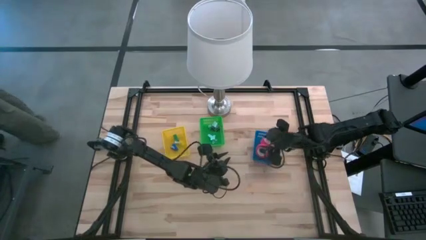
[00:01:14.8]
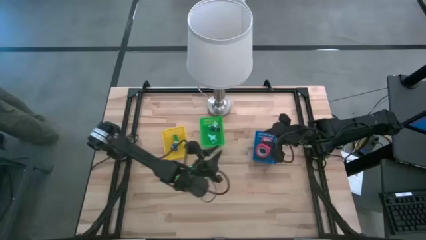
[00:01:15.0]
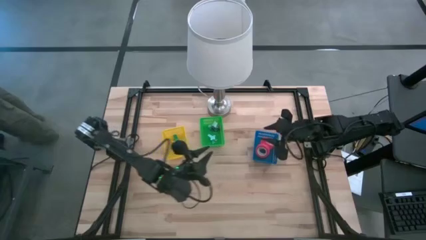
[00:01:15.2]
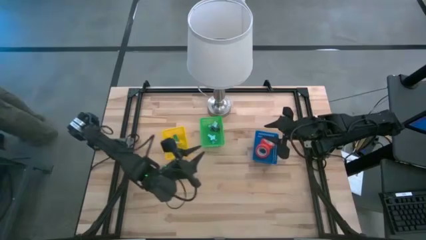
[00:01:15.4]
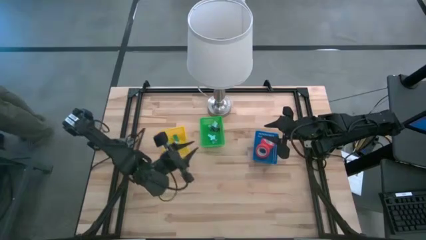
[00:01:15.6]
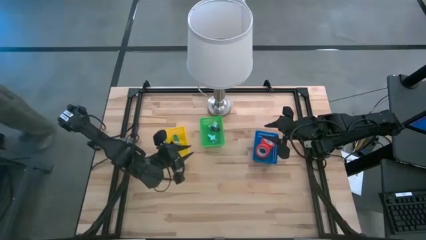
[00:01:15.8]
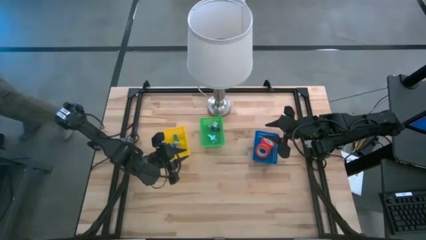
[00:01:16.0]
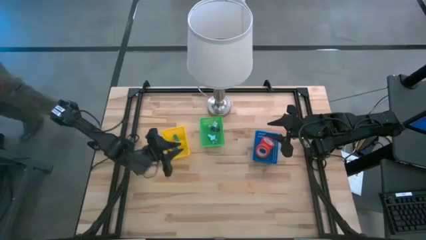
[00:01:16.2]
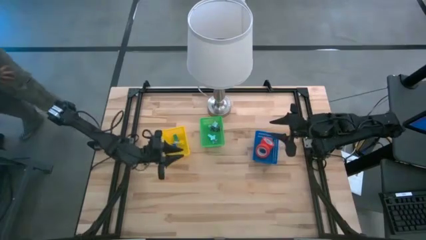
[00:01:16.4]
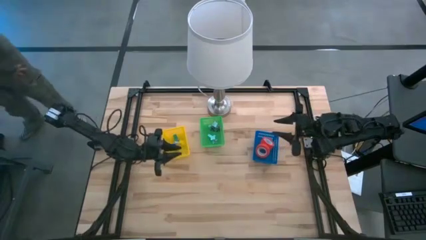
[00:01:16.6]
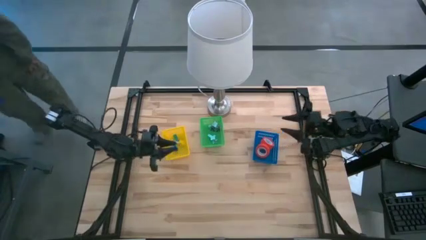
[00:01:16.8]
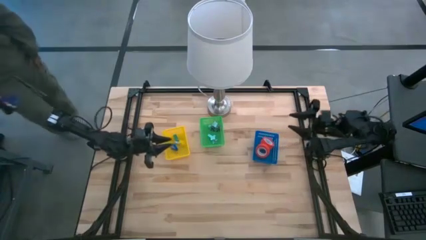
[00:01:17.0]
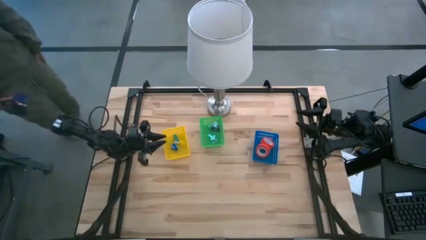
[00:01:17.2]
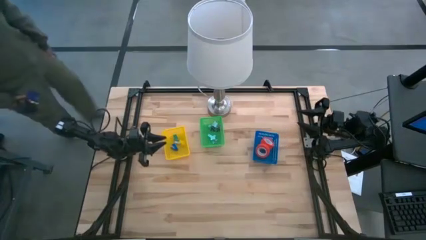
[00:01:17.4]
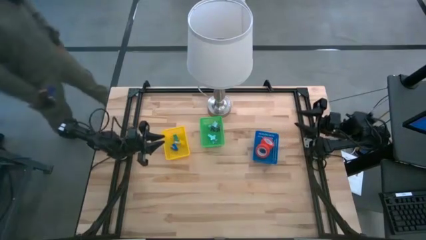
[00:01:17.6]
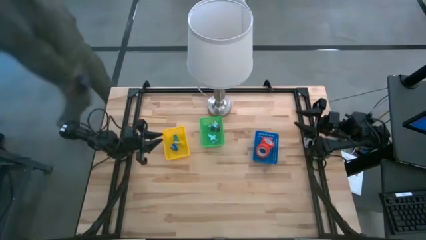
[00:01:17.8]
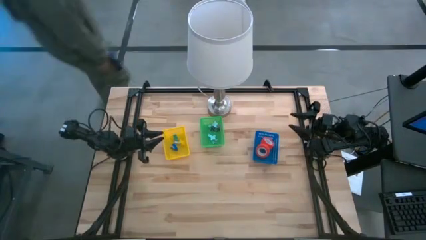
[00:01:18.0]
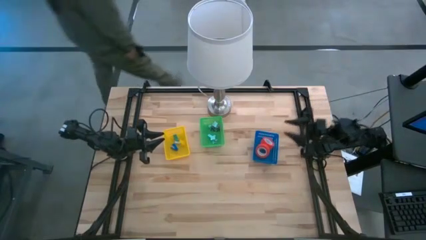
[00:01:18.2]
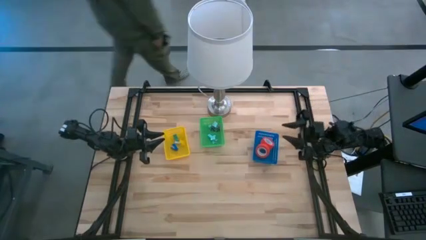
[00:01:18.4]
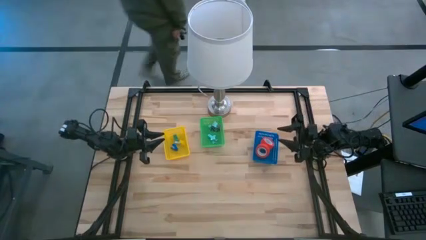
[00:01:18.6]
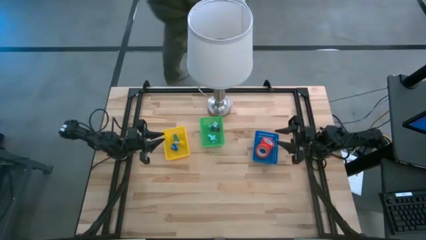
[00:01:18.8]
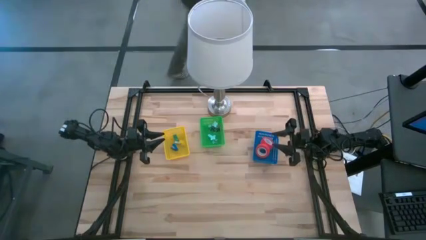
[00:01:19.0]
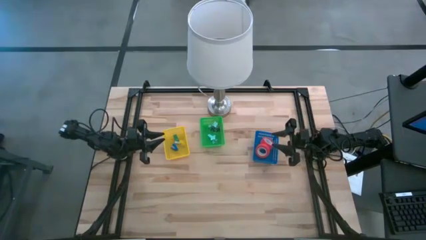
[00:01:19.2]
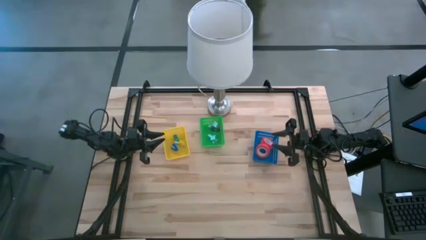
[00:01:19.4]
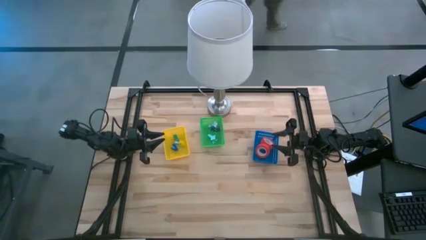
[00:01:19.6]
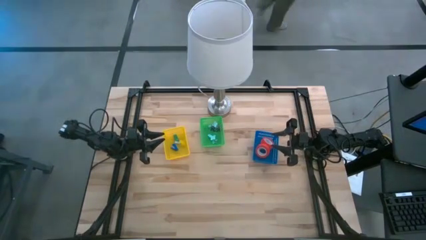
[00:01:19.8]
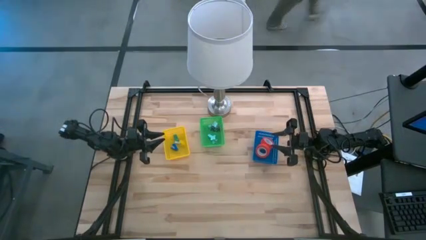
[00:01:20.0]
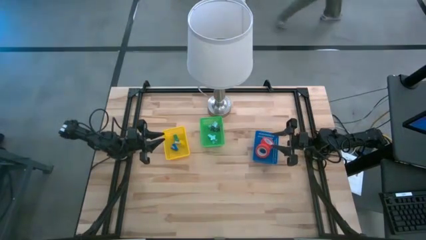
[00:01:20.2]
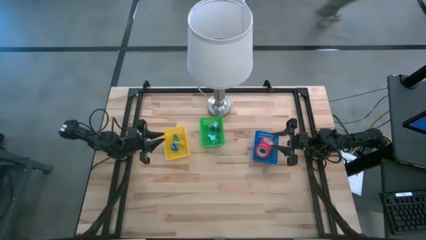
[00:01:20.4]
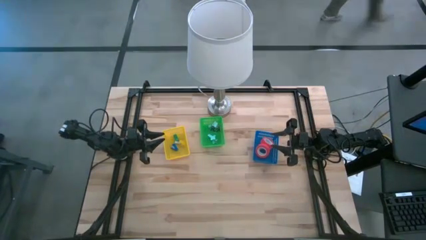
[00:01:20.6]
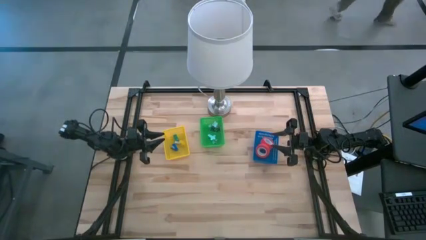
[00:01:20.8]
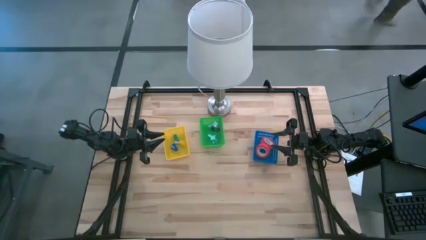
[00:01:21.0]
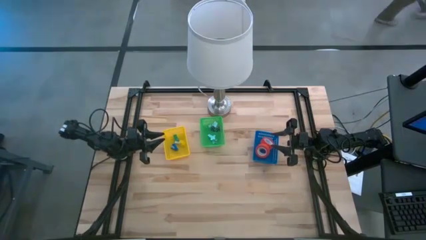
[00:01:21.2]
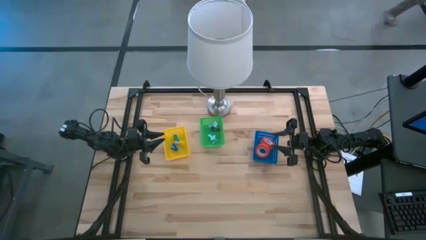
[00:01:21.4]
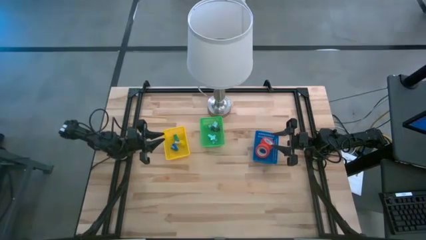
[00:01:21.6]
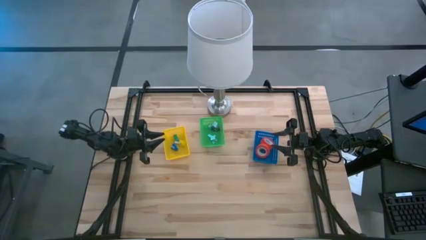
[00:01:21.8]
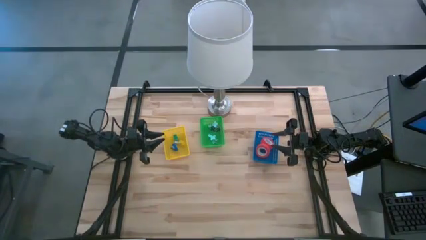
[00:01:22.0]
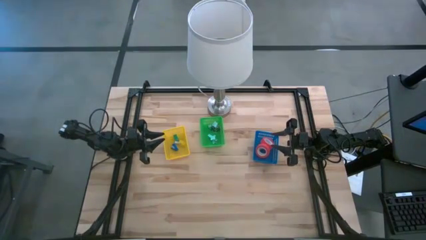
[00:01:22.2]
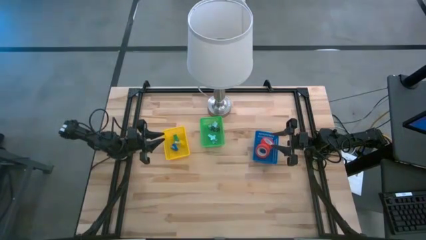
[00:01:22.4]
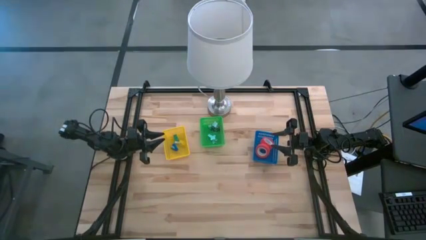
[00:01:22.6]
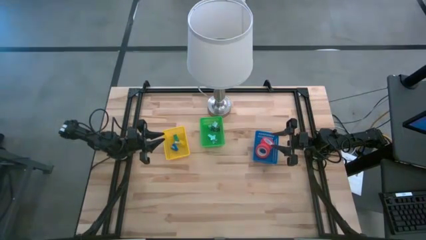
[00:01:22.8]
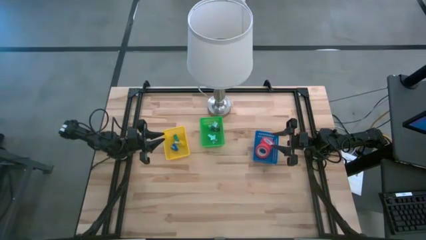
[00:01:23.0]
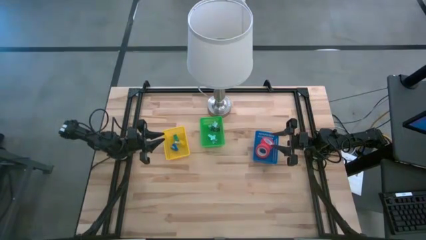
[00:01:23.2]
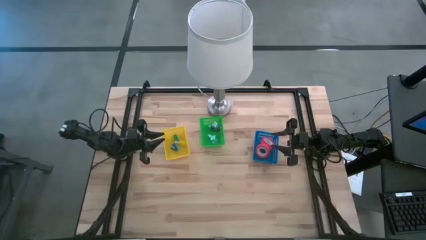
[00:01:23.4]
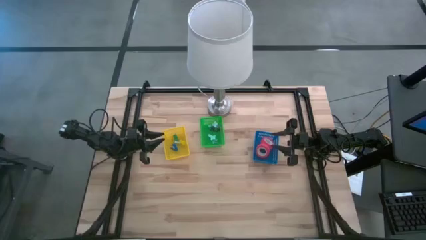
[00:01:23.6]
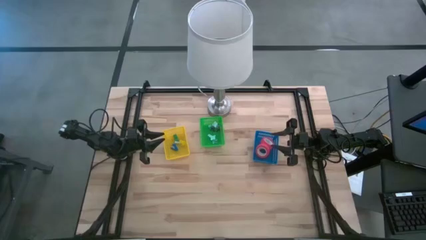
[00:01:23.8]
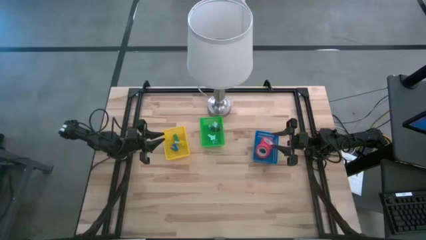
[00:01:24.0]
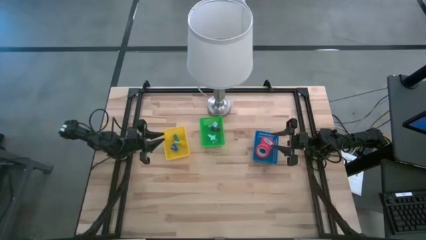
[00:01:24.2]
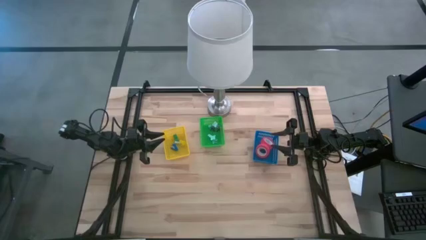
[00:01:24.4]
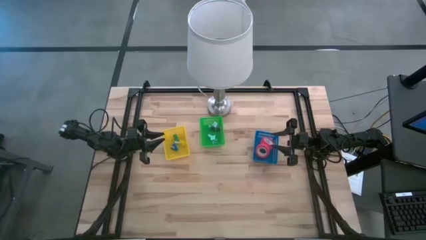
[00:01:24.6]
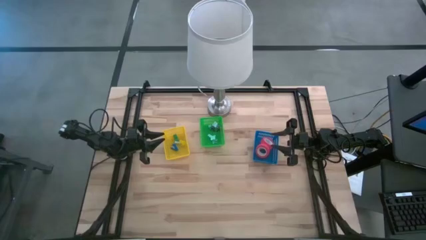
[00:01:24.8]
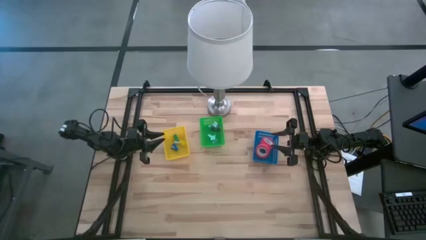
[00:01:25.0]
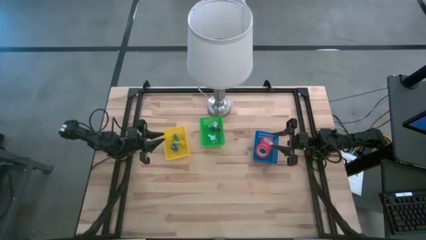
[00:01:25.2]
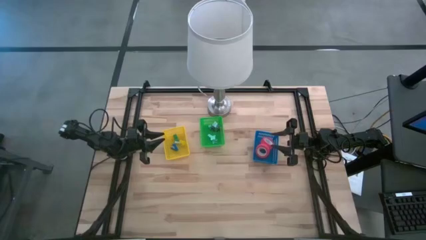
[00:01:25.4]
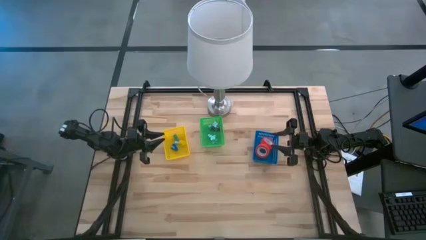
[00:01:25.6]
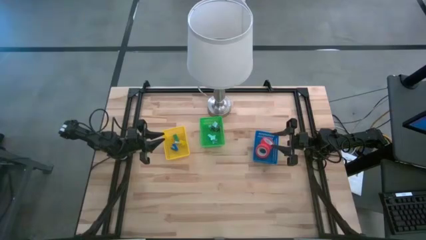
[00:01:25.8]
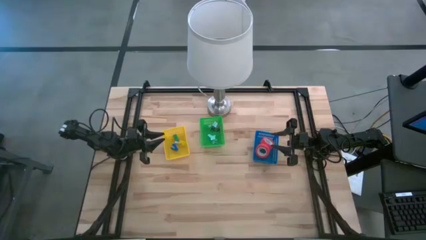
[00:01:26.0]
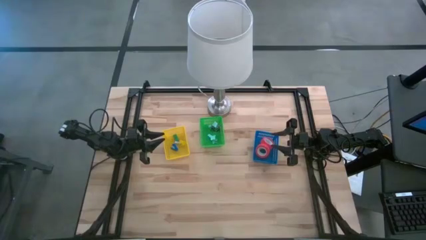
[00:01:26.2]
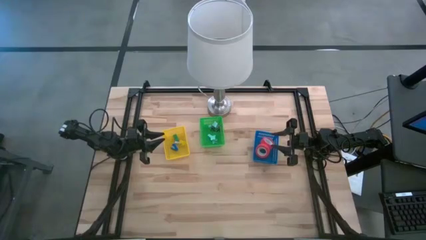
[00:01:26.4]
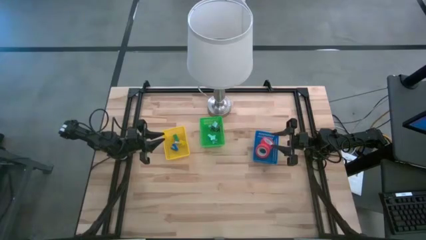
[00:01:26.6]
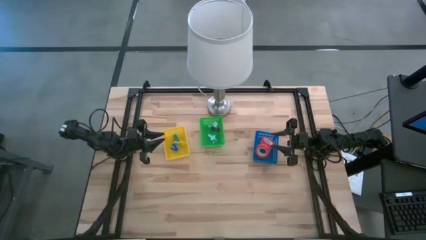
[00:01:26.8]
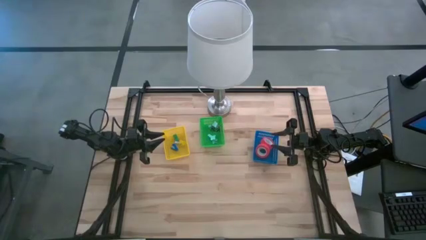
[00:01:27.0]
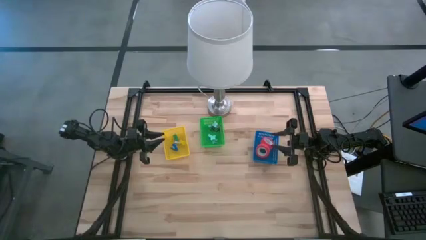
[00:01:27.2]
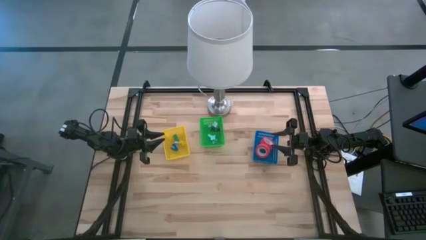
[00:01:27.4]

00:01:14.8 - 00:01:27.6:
Task: Pick and place Stapler, Stapler remover, tape
Return to Home Position

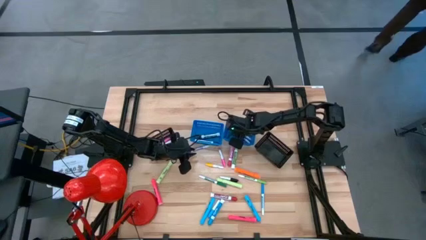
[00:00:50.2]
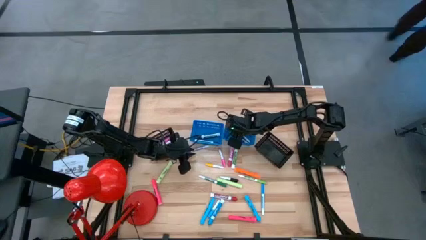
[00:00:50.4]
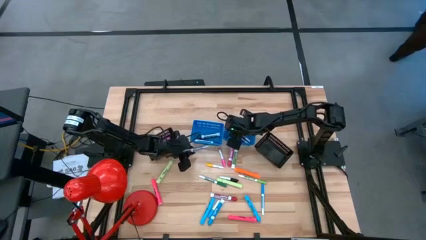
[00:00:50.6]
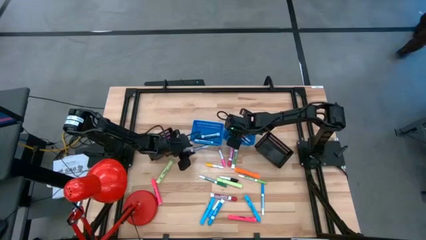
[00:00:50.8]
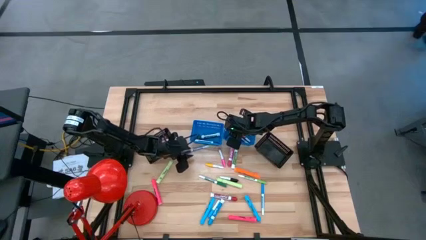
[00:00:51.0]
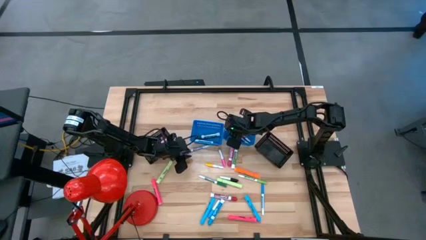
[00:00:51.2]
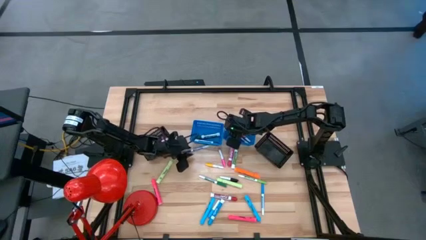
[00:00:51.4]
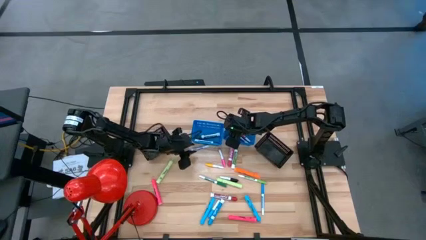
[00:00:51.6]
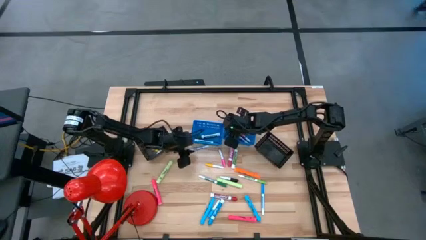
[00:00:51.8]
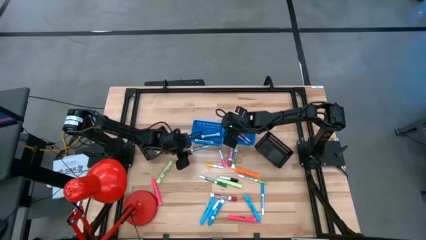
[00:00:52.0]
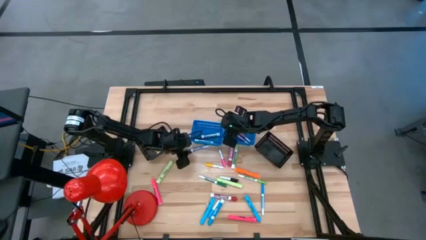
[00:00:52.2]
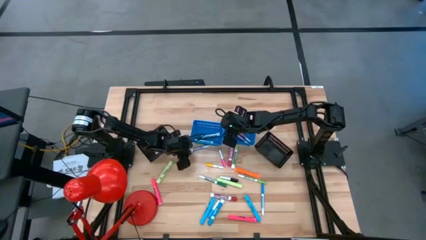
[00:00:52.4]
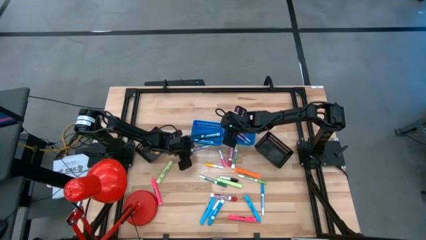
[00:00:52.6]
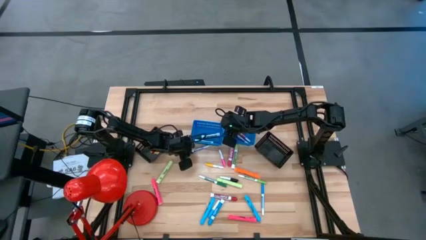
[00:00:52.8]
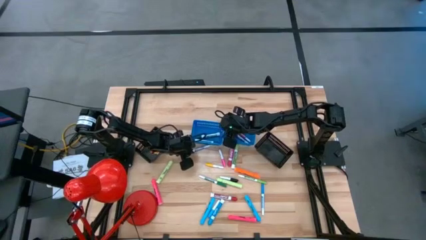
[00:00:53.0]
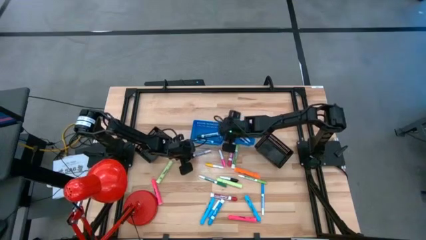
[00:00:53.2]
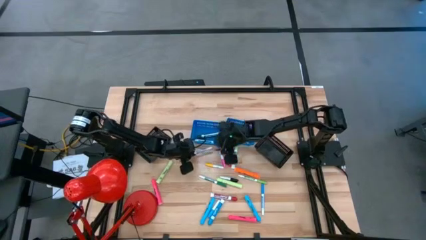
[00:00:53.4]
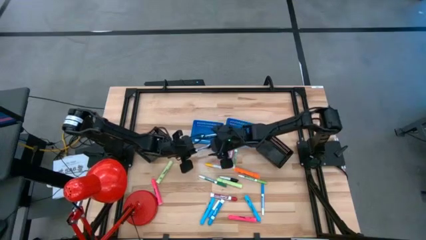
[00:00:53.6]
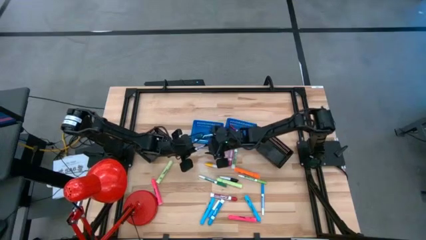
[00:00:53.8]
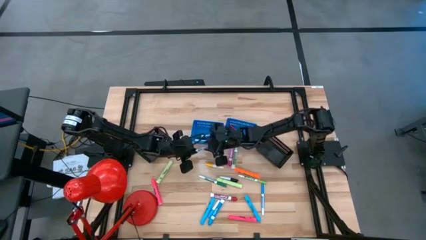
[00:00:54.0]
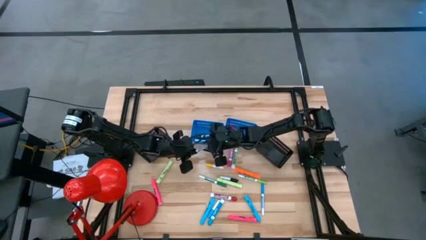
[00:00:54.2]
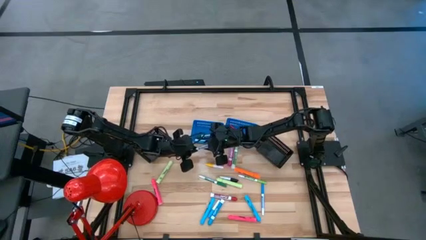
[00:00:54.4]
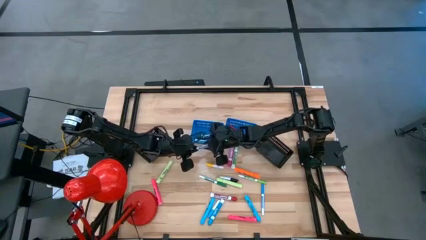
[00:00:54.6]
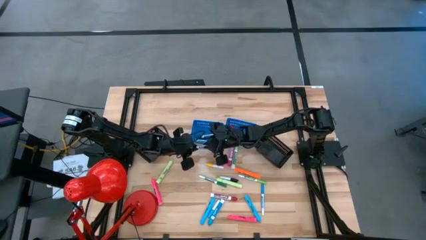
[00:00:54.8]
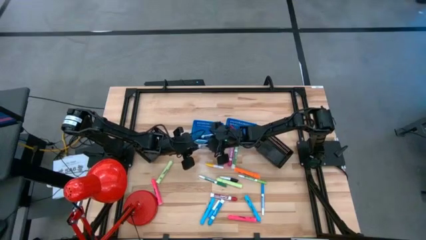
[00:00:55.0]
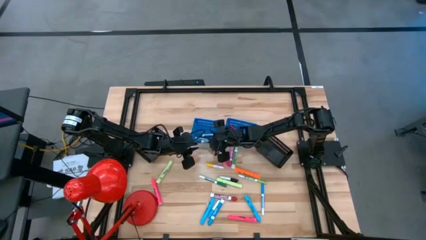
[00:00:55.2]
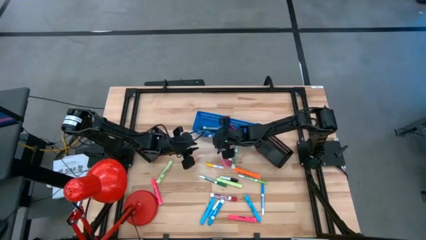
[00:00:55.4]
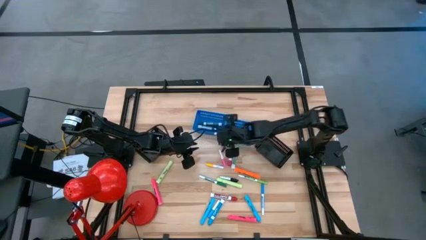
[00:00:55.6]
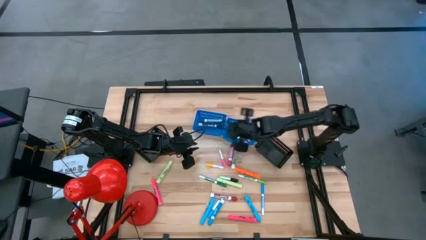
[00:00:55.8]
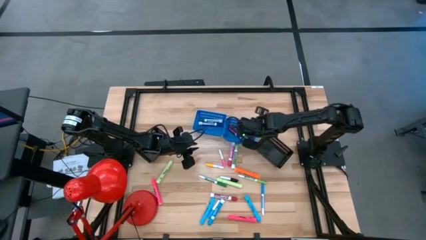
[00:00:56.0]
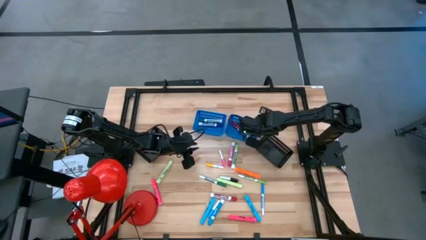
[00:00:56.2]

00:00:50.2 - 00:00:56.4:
Task: Pick & Place Markers
Put the dark blue alcohol marker into the right blue bin
